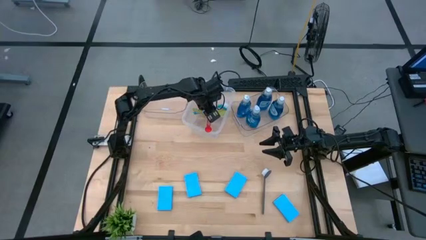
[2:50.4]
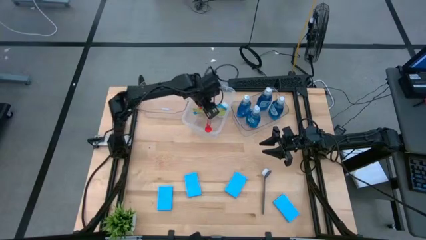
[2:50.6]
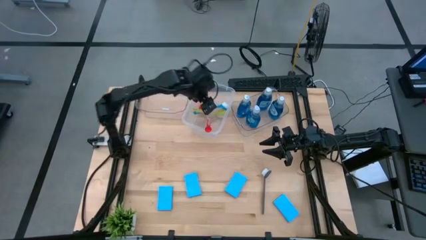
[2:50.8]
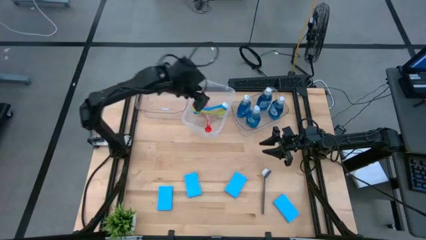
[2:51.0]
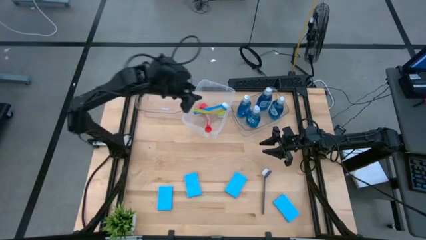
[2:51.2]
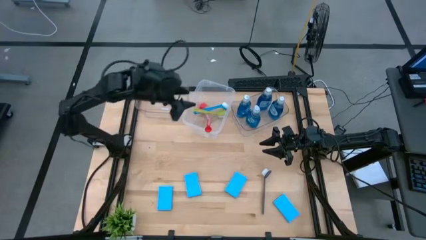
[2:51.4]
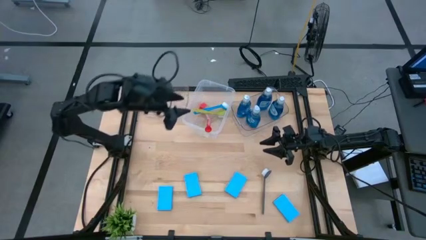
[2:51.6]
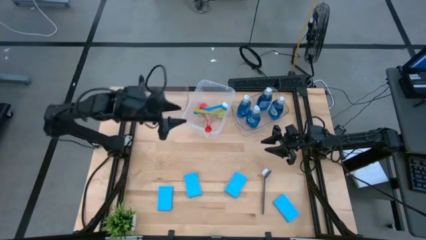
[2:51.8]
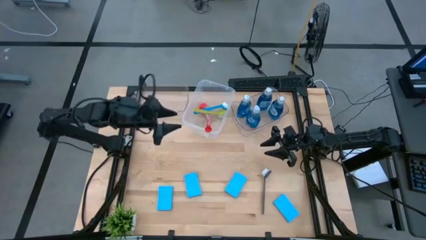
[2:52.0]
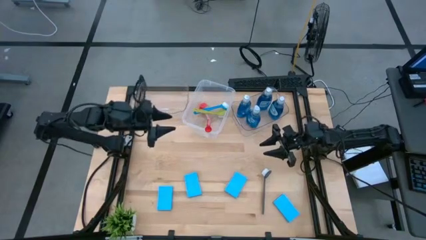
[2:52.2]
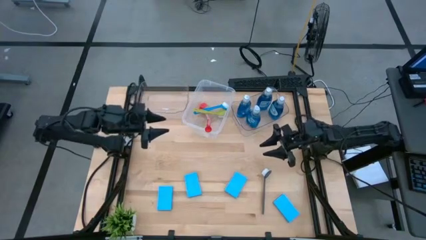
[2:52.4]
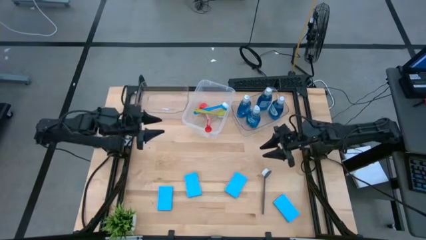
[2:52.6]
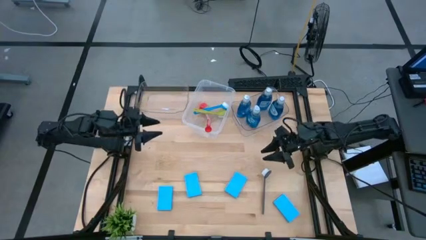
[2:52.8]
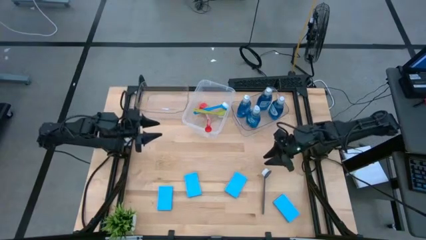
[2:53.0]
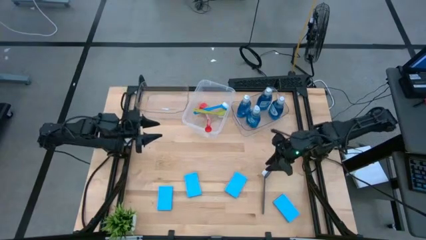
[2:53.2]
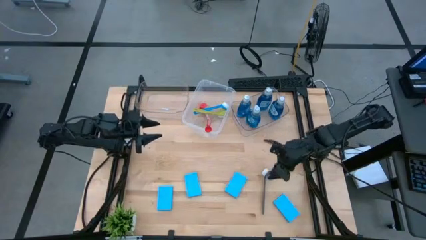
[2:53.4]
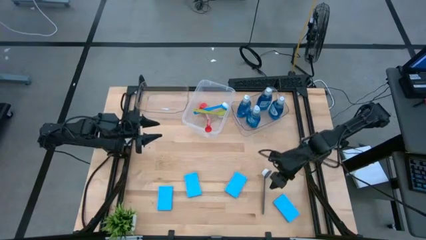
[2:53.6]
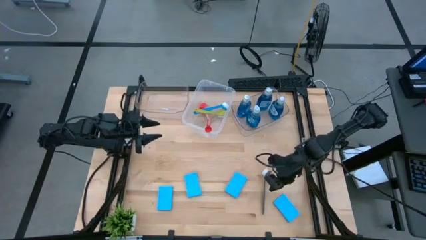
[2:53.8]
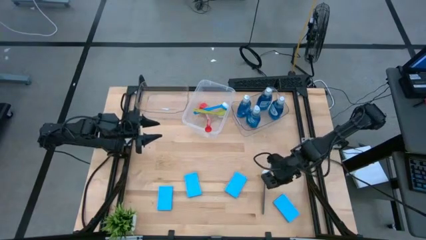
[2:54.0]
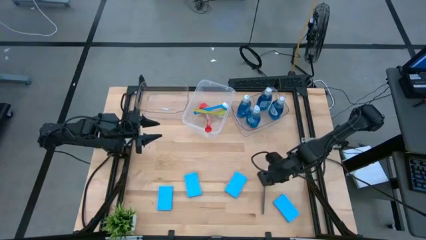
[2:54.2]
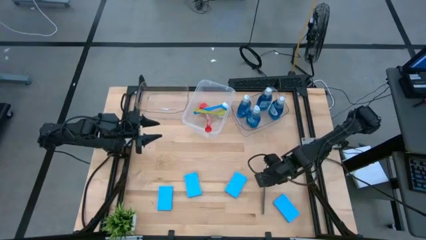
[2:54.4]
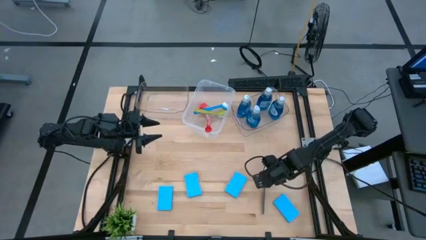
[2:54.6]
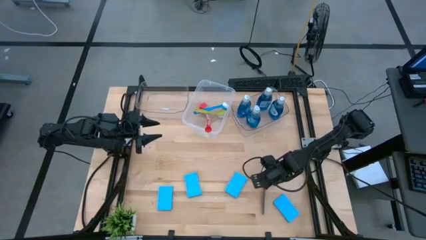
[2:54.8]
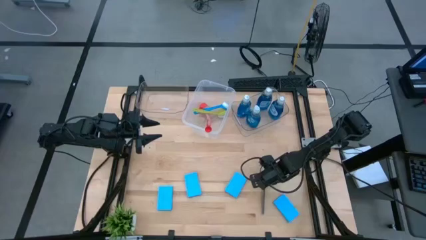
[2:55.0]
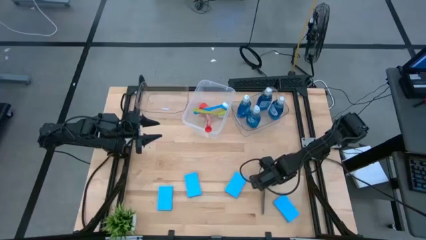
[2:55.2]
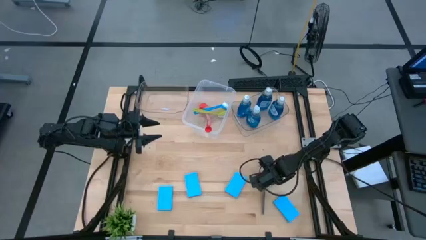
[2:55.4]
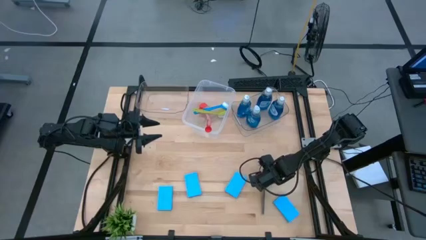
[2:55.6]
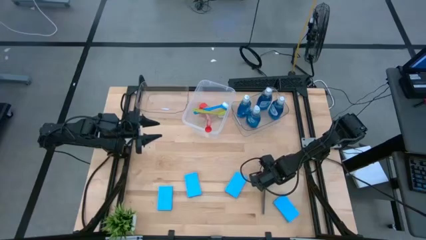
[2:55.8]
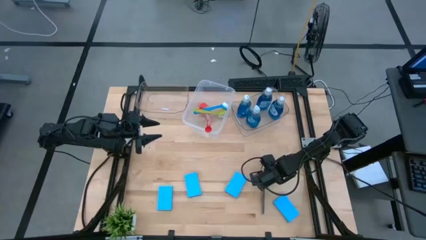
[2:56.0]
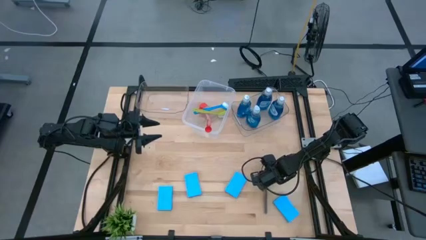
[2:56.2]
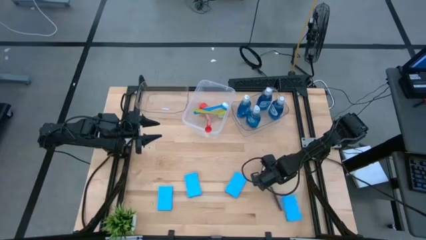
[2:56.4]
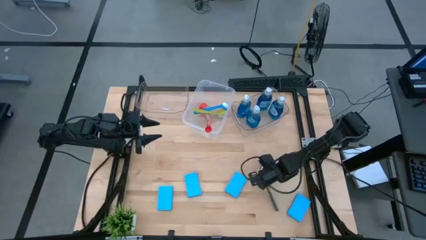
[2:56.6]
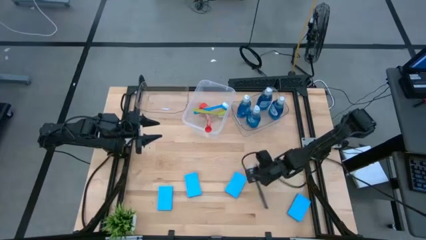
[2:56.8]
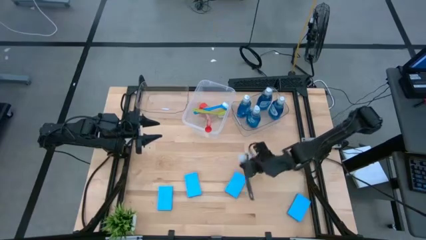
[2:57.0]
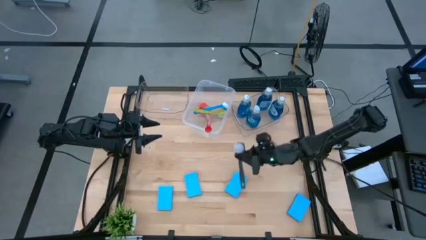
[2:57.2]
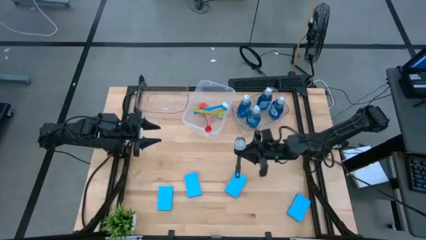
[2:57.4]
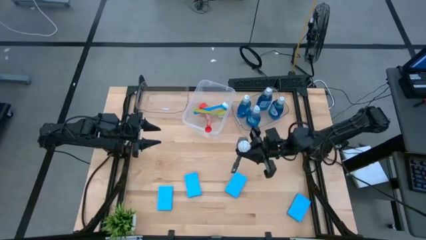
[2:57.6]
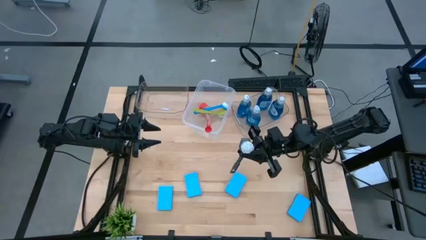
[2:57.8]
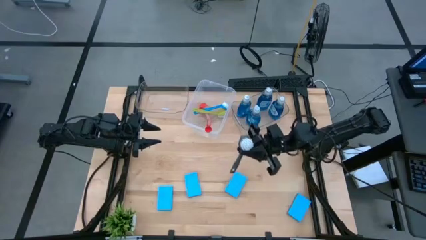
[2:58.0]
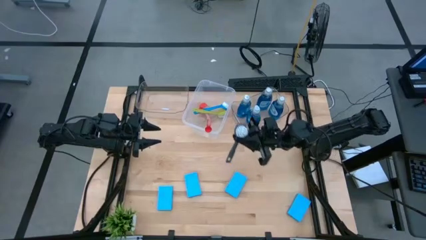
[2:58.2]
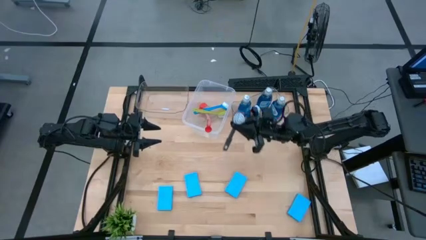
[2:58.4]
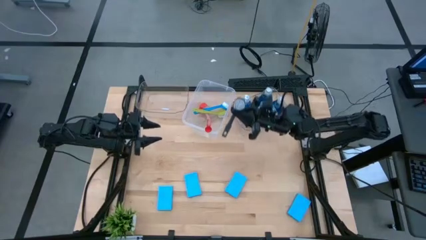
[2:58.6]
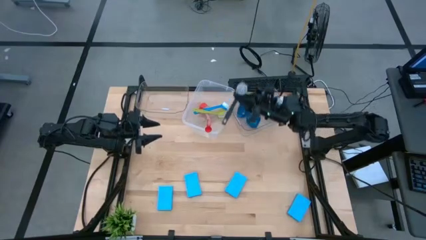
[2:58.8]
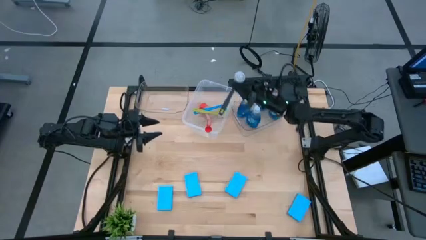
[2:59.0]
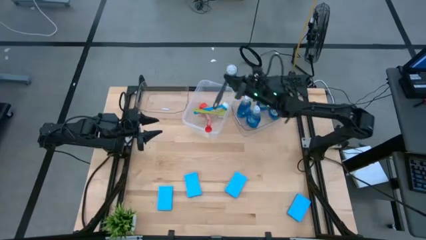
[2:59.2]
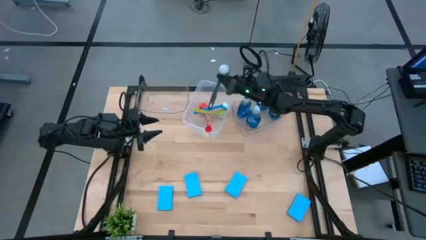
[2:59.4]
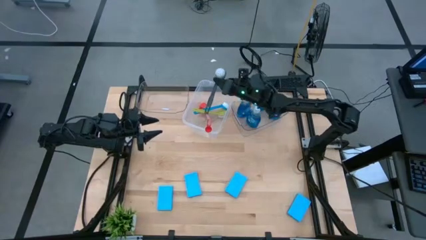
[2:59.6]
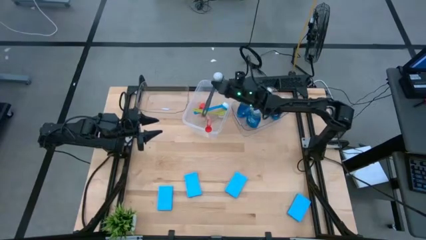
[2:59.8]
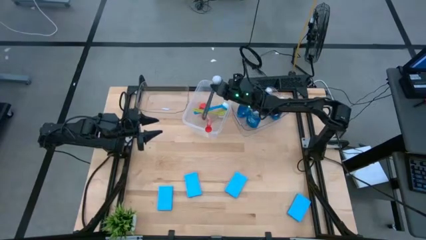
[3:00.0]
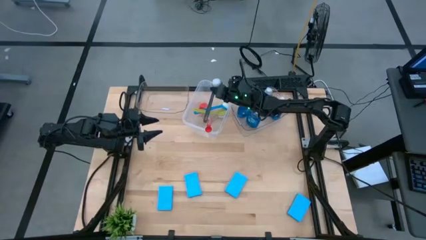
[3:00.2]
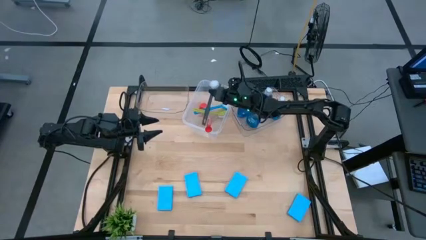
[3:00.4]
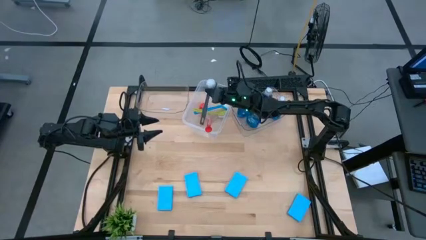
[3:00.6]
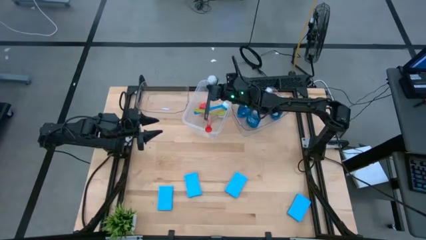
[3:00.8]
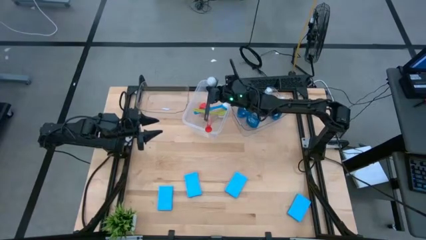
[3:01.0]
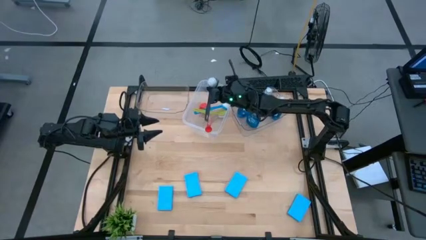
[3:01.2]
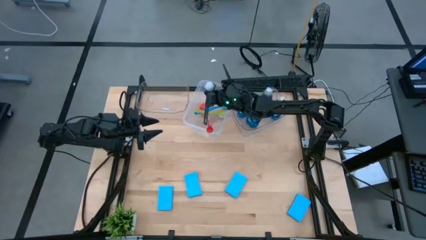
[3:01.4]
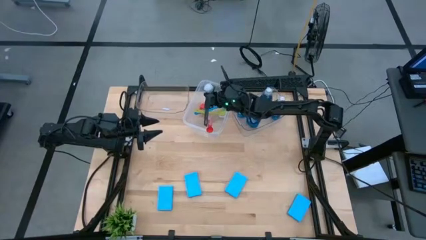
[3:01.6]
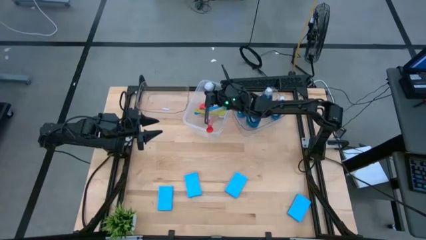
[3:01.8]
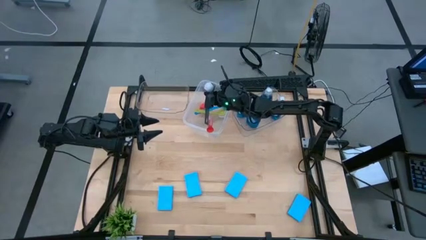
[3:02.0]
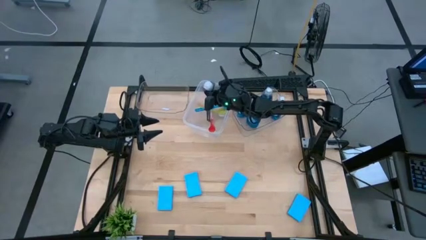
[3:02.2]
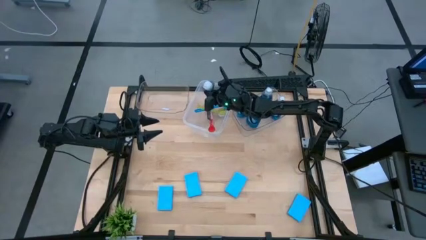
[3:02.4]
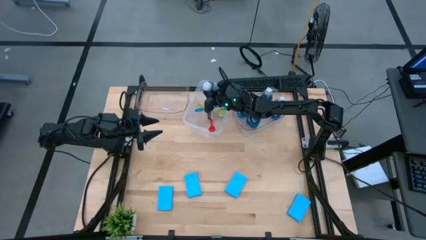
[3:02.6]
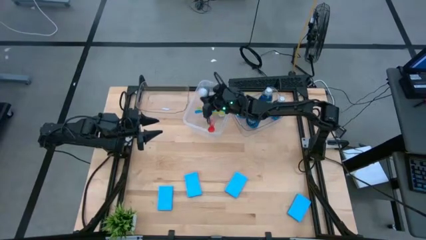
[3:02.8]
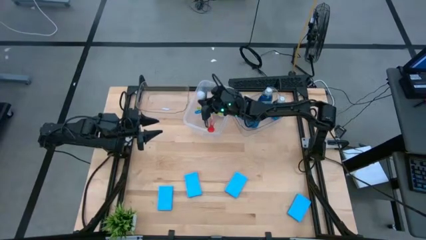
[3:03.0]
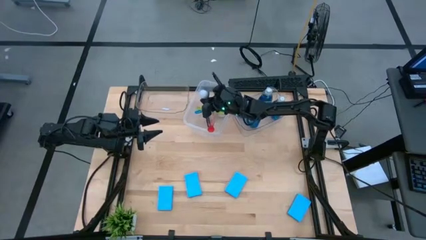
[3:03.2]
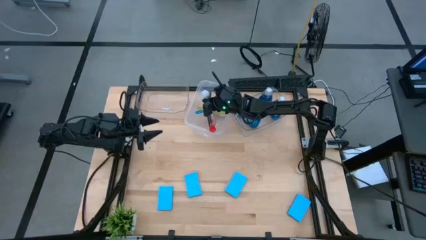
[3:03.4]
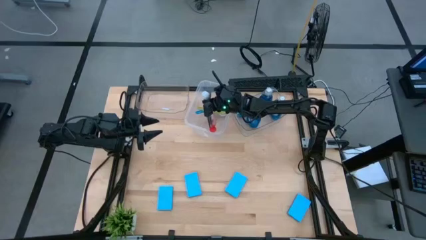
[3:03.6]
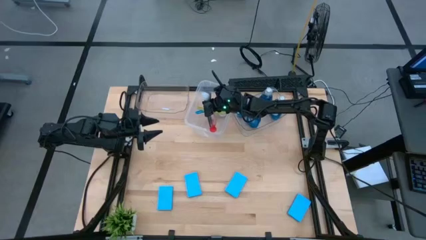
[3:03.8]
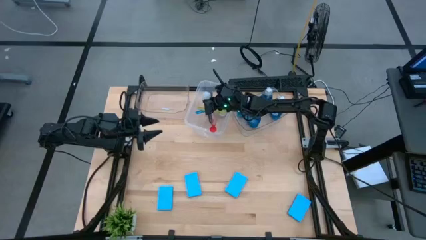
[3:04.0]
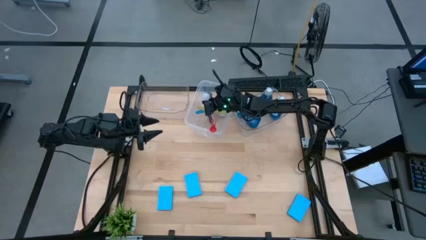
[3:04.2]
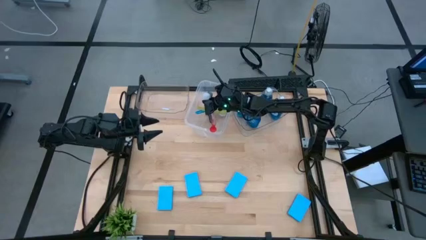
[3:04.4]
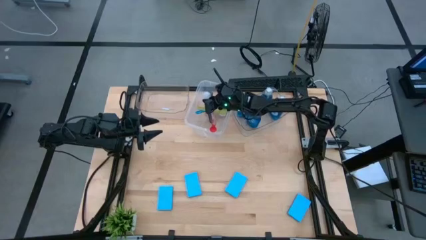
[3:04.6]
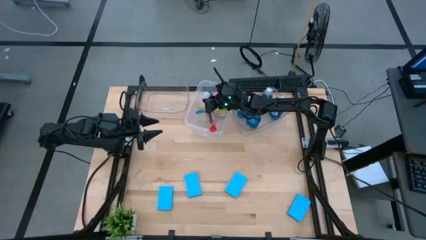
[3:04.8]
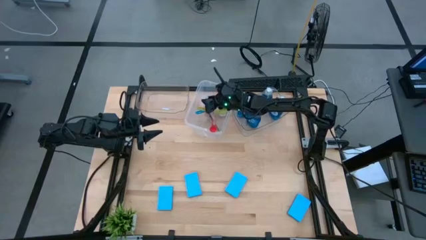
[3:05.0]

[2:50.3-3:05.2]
Task: Pick & Place Kitchen Sink Supplies
Put the dark gray dish brush into the transparent container

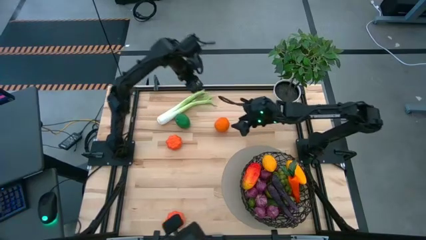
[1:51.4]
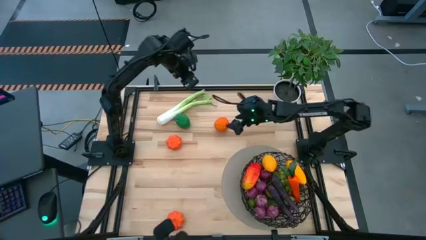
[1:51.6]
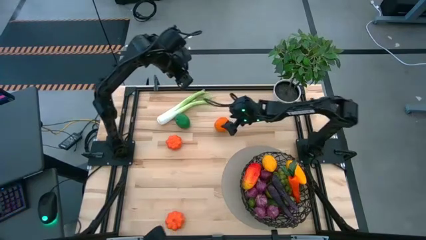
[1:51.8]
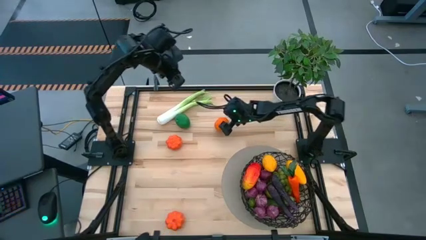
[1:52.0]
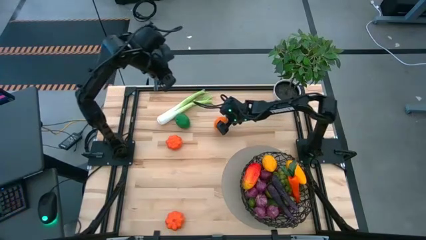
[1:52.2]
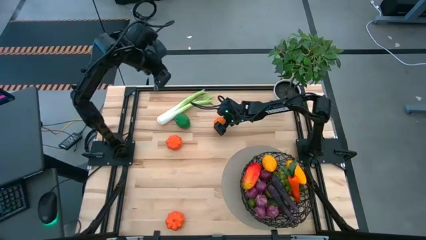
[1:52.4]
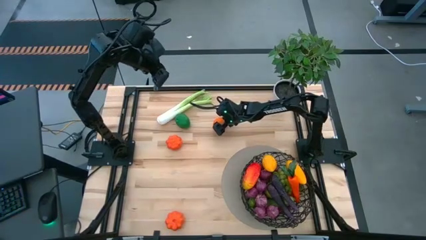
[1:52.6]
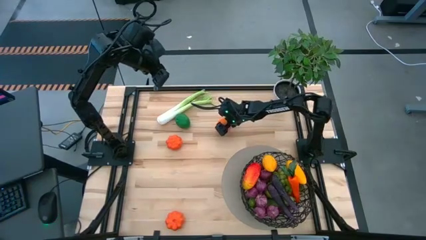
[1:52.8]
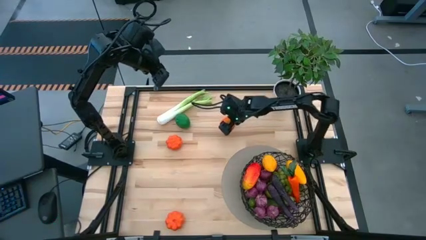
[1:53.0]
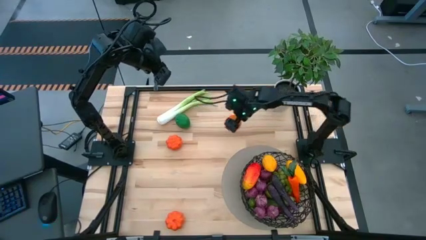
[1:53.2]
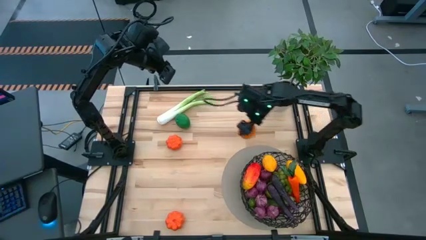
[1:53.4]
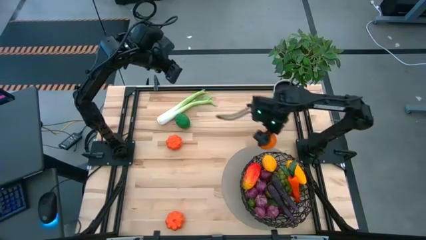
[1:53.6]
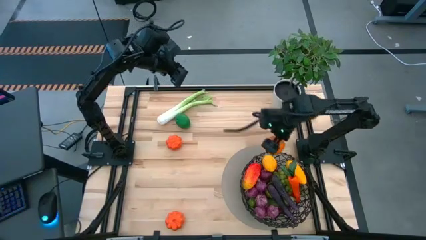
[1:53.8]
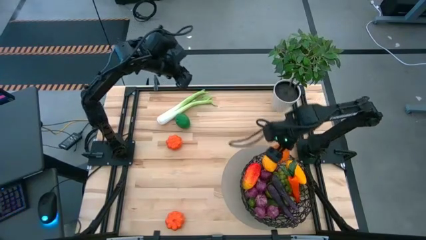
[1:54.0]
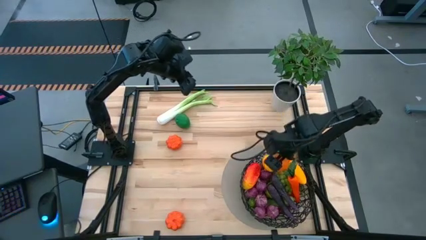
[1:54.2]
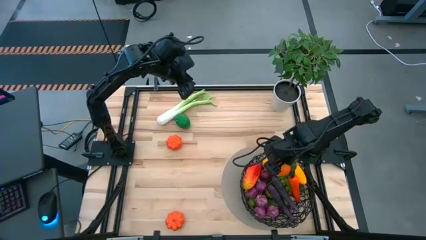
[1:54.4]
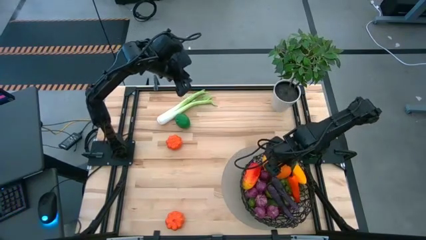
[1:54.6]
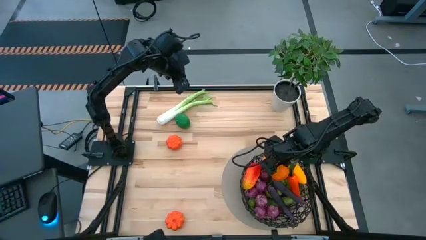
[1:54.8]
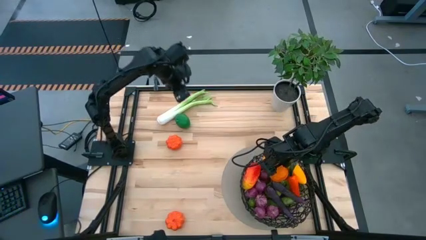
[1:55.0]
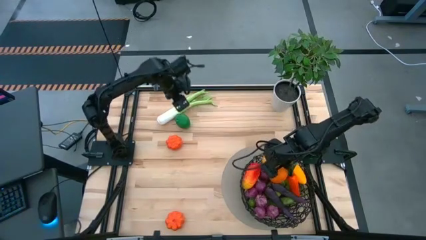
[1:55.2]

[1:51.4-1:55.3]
Task: Build produce basket
Put the orange into the black basket
